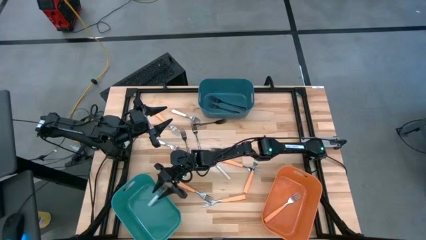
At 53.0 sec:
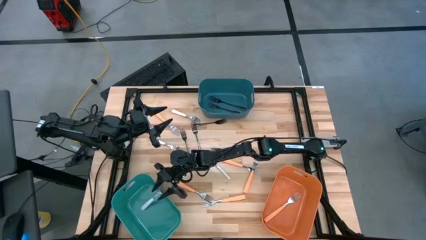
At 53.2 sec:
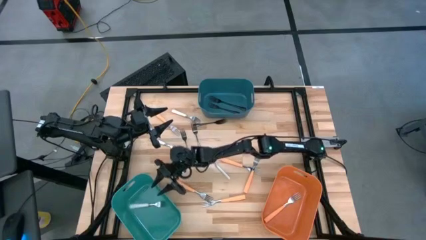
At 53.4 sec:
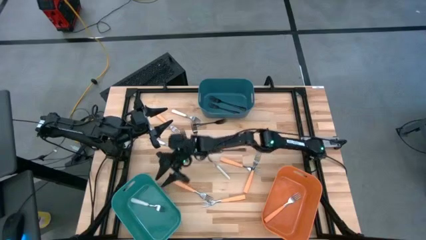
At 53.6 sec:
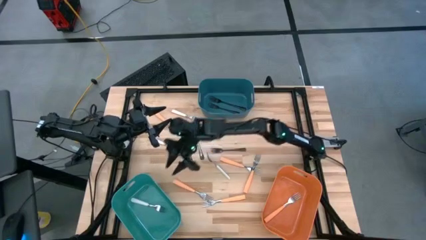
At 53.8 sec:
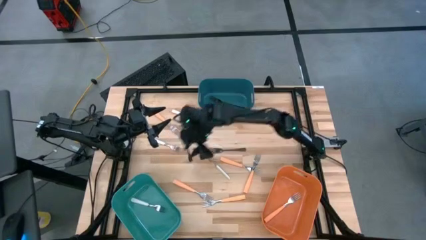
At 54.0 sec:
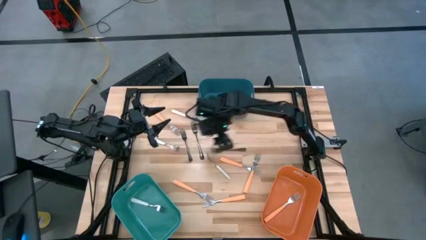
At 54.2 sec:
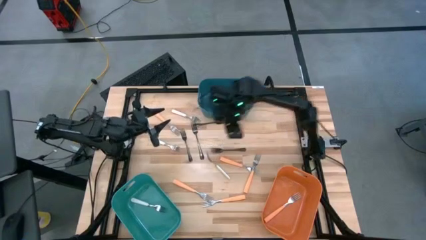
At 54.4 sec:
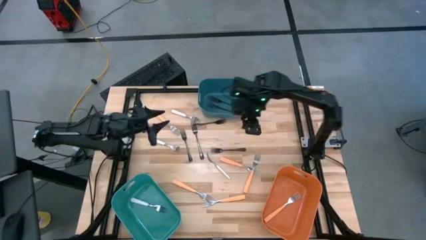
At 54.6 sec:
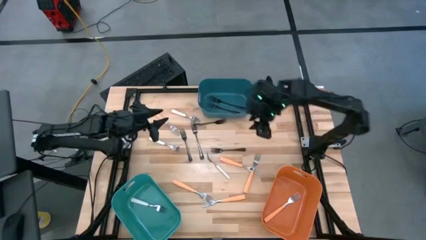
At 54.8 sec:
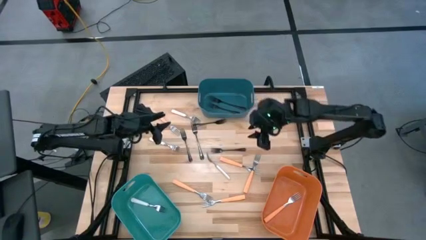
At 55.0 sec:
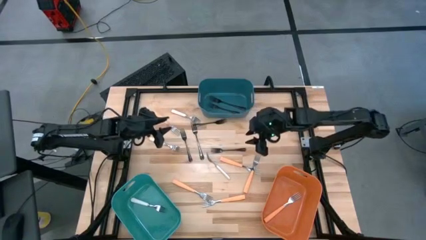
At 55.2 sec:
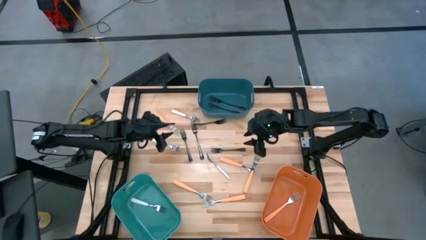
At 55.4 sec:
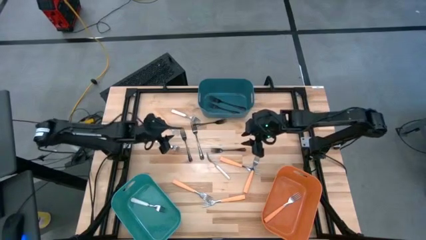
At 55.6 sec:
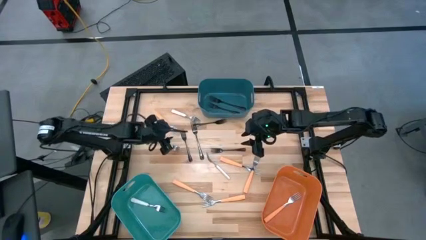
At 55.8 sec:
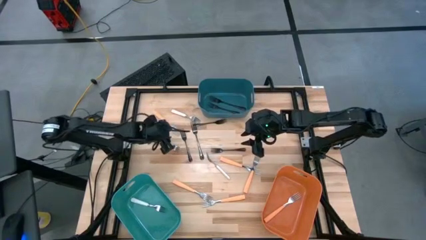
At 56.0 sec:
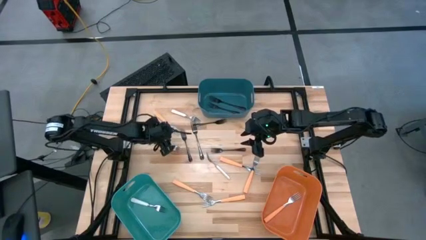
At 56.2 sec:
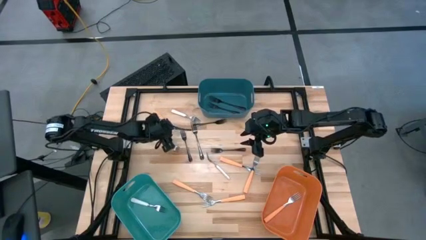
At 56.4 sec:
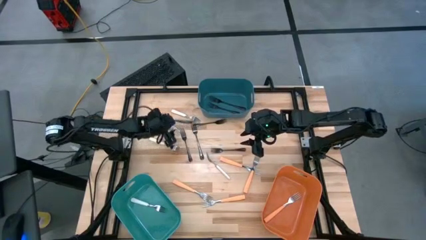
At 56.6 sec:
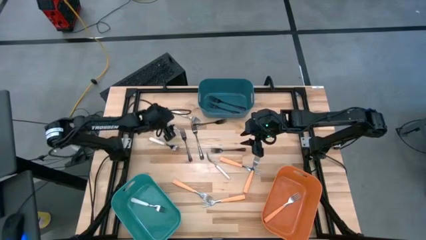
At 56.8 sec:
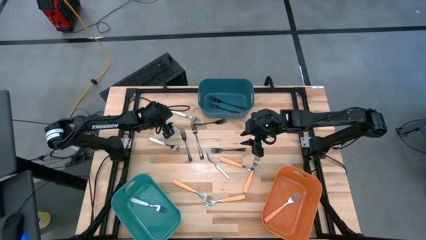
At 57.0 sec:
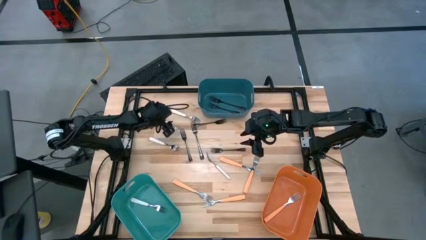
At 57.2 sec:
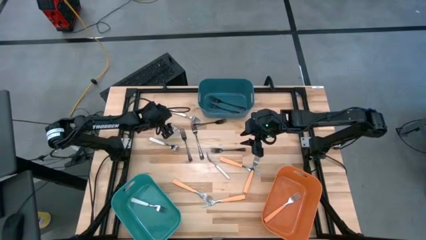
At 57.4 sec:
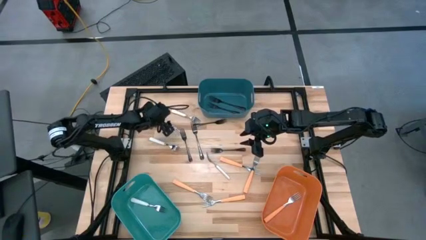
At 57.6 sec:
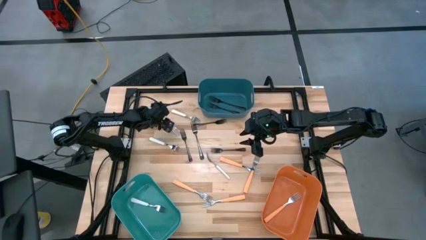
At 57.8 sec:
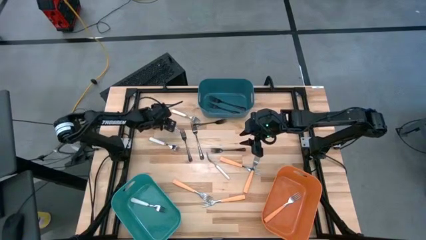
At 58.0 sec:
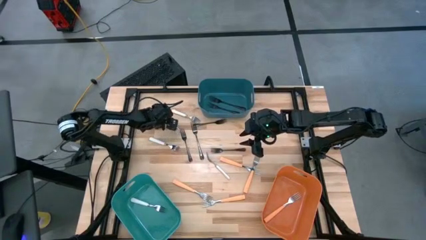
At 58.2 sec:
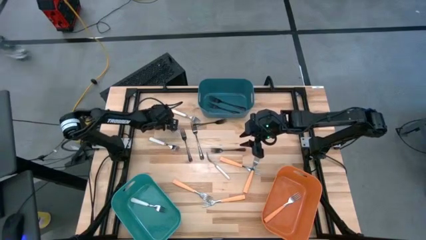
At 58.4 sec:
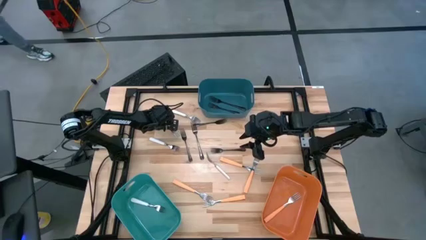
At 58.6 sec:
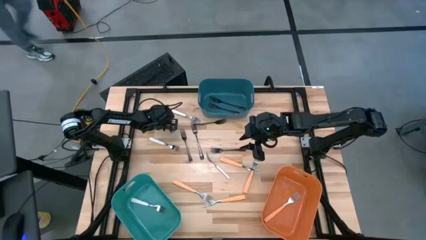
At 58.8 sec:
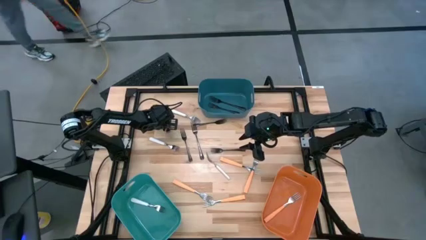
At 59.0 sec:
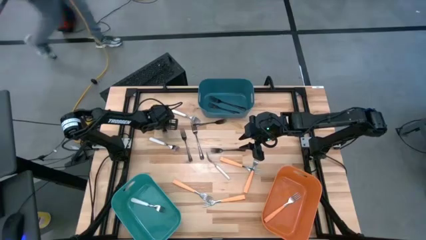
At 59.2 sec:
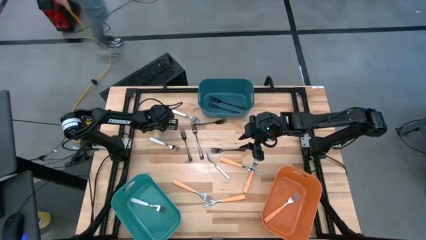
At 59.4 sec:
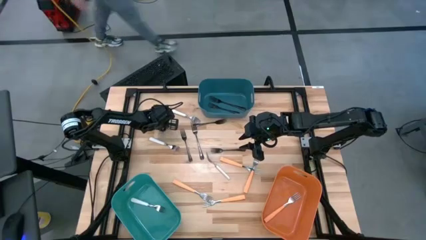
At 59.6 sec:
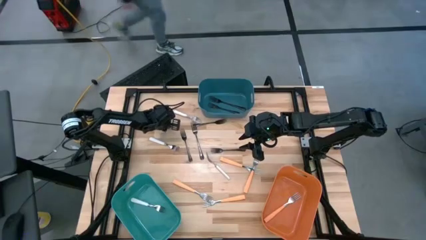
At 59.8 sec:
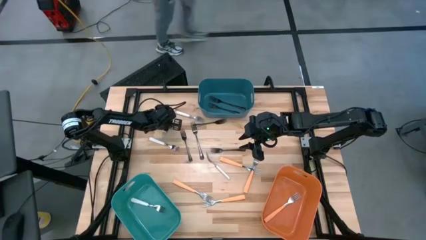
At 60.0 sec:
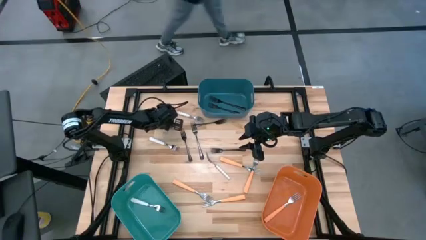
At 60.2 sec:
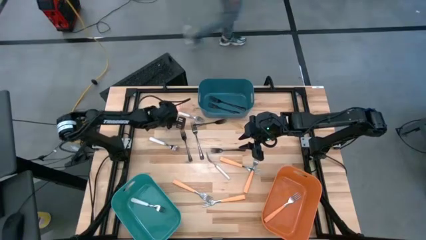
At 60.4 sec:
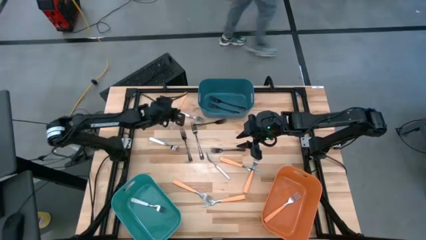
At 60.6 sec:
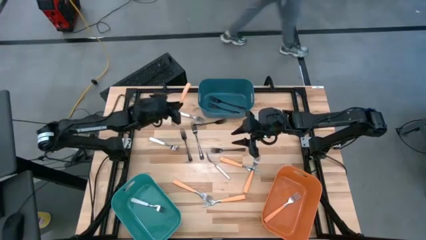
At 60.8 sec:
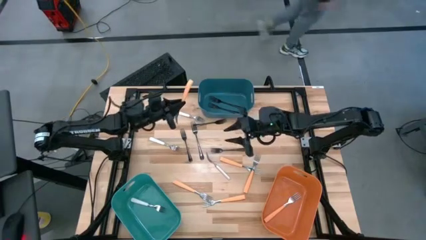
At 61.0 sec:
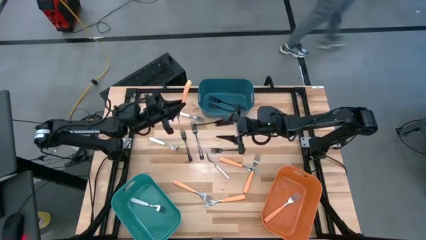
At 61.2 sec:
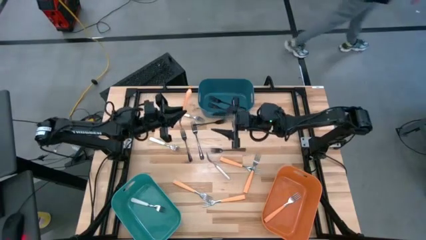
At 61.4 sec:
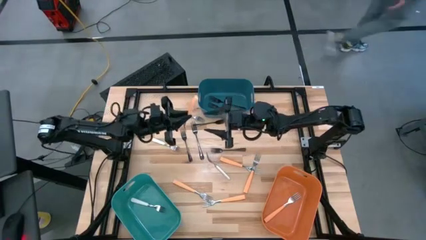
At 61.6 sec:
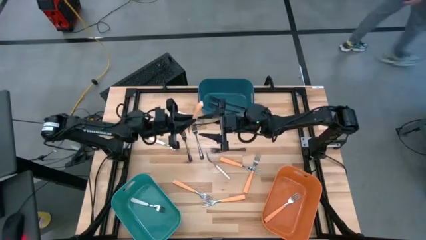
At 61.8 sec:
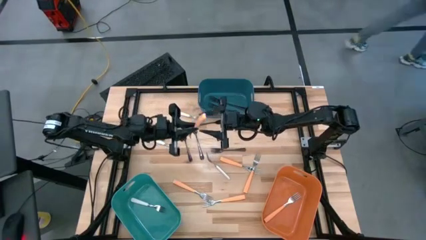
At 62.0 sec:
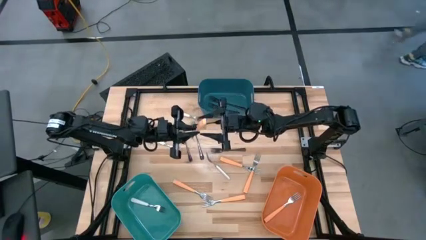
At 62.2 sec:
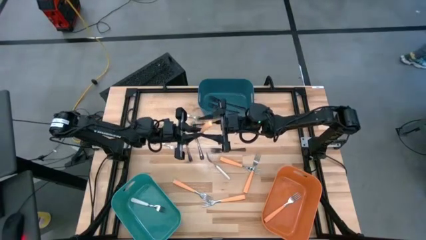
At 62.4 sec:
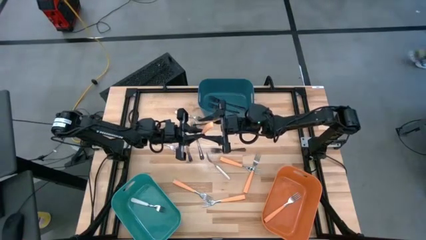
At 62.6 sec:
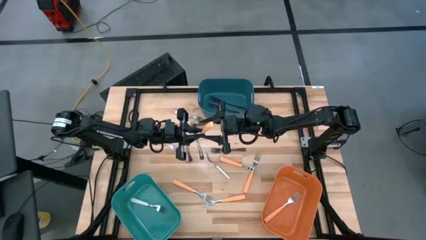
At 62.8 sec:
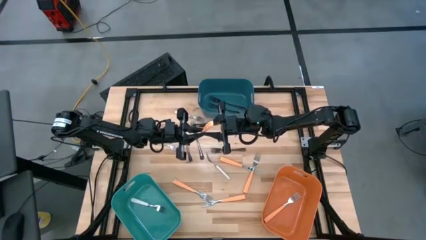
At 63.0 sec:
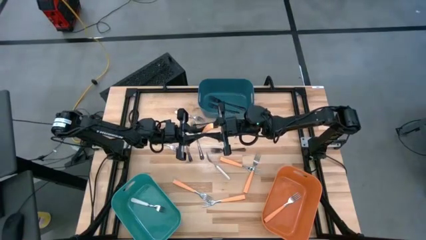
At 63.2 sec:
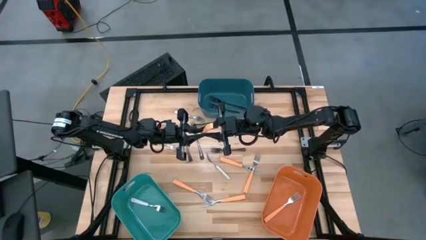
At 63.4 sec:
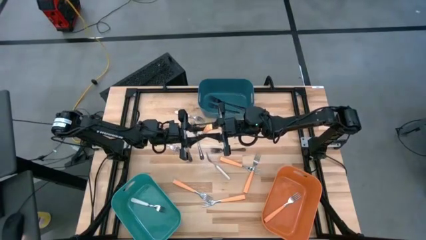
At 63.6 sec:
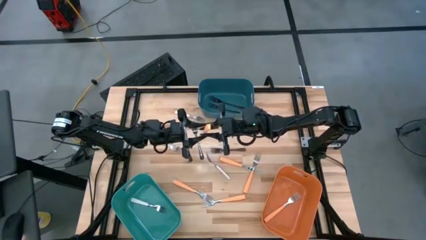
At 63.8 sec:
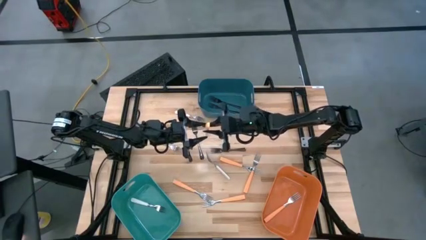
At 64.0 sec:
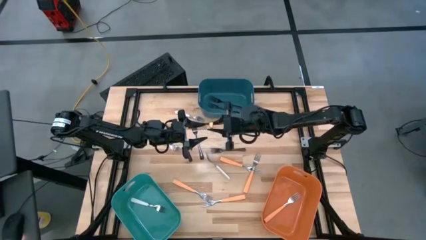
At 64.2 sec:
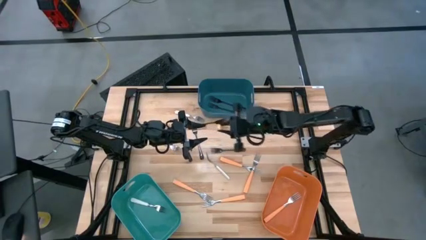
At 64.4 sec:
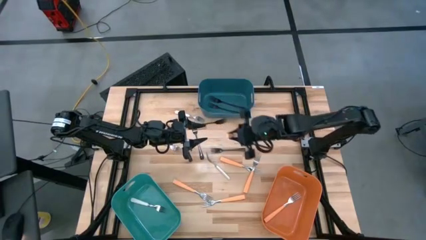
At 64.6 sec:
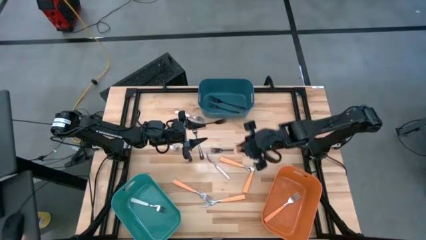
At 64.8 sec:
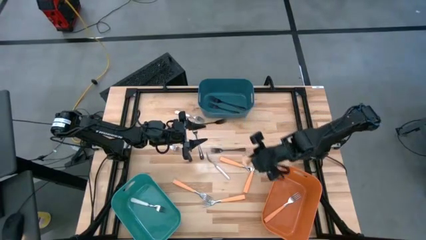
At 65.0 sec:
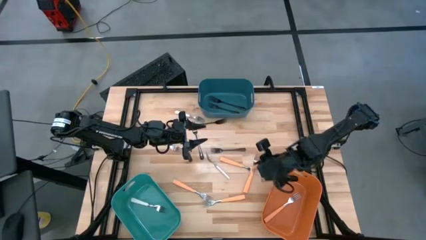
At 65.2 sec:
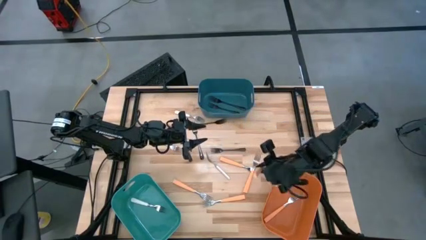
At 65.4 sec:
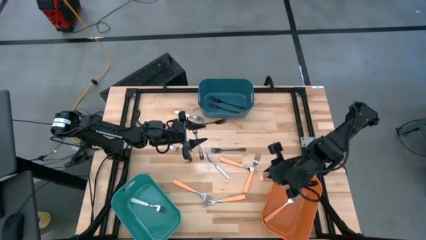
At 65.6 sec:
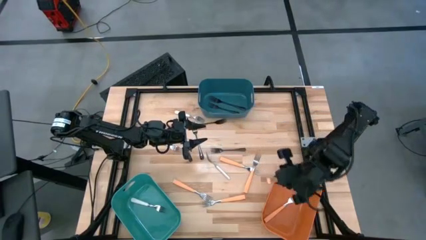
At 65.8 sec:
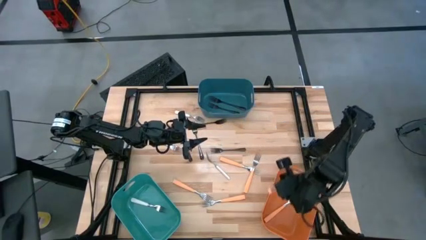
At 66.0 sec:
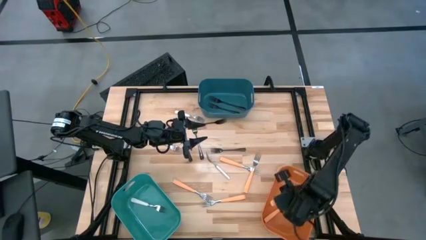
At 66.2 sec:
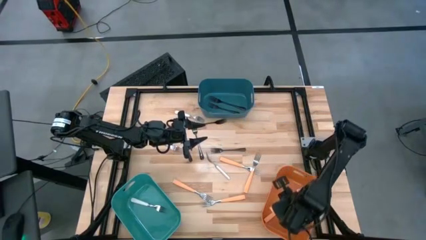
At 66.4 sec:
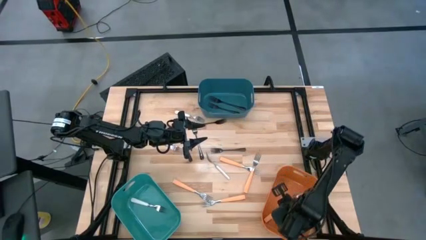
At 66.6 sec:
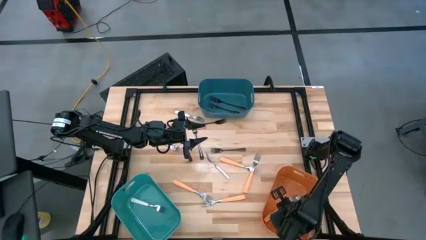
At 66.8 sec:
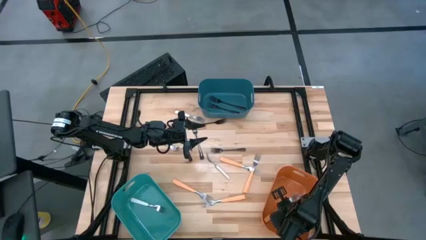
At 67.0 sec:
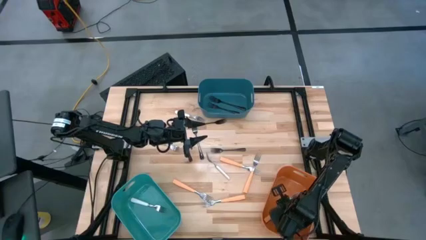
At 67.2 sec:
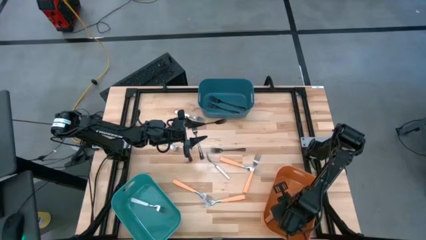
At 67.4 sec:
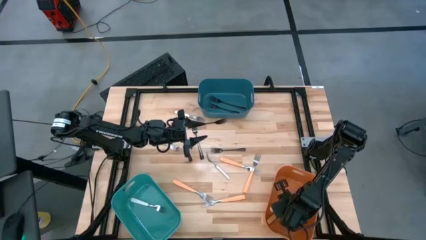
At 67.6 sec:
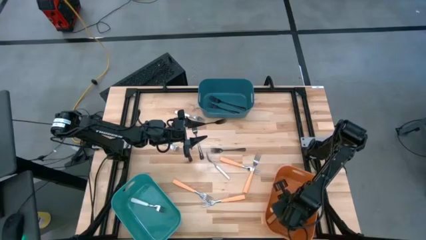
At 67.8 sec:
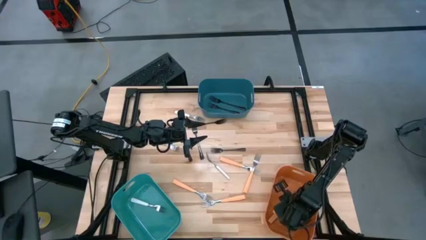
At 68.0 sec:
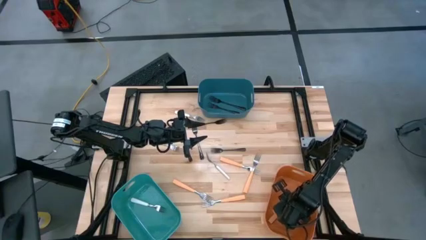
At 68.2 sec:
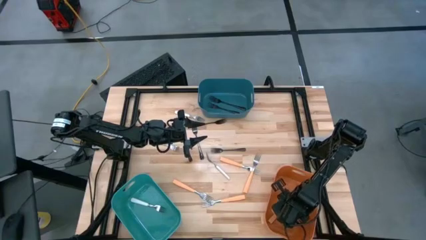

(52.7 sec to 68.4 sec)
Task: Sort silverware by color (type)
Put the orange fork into the orange bin
